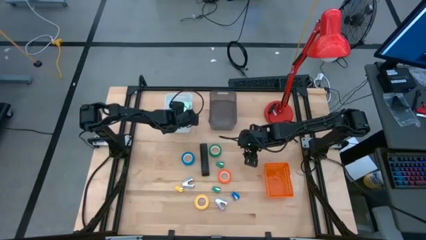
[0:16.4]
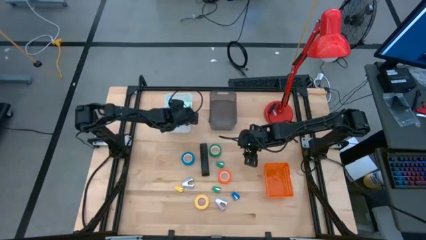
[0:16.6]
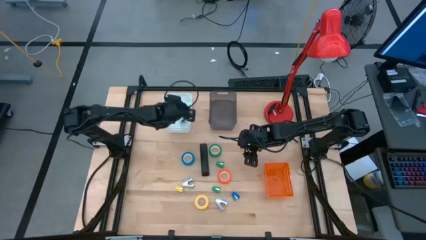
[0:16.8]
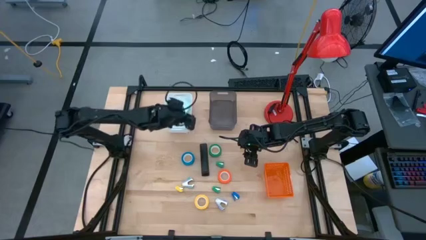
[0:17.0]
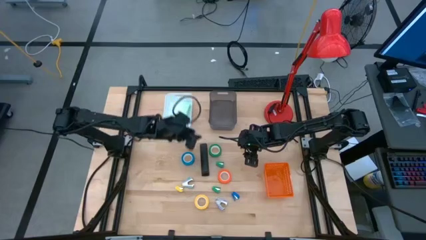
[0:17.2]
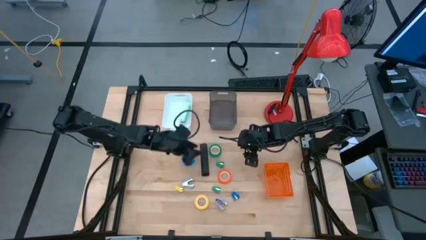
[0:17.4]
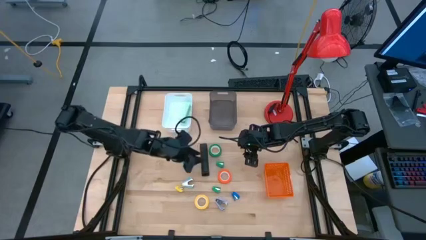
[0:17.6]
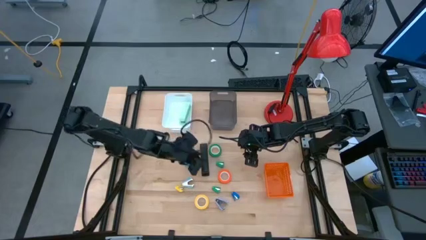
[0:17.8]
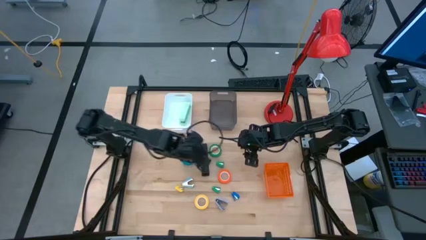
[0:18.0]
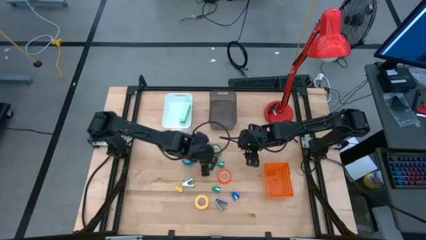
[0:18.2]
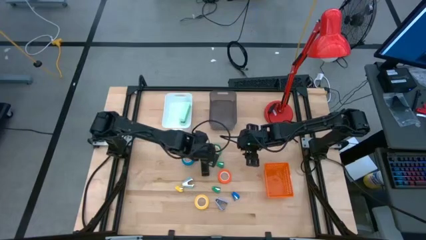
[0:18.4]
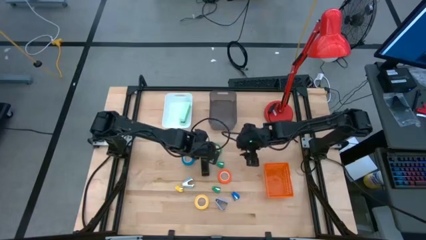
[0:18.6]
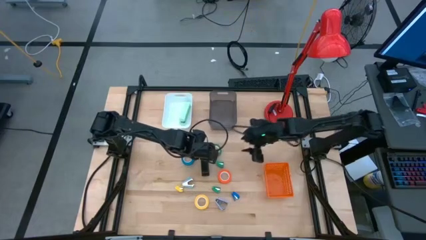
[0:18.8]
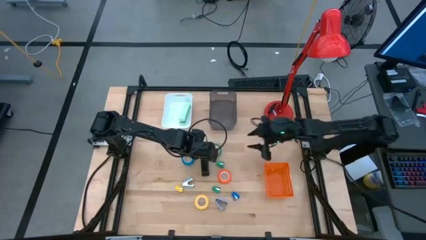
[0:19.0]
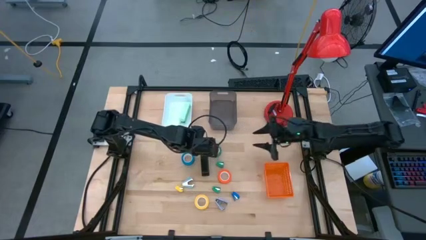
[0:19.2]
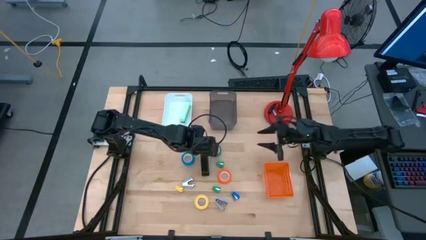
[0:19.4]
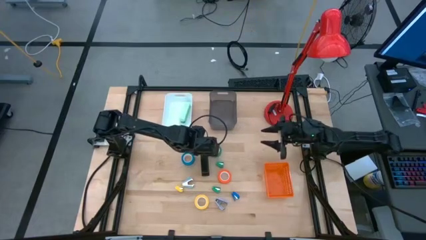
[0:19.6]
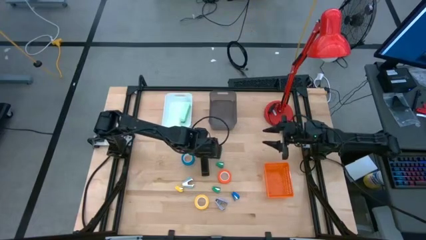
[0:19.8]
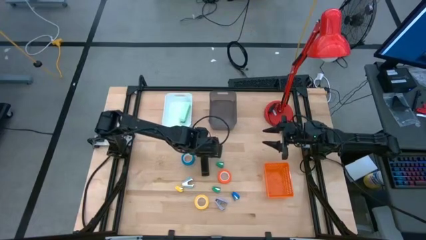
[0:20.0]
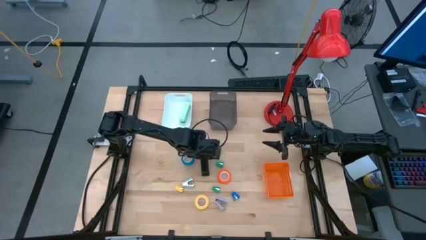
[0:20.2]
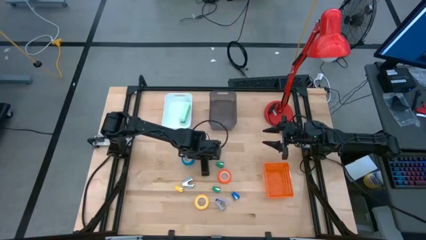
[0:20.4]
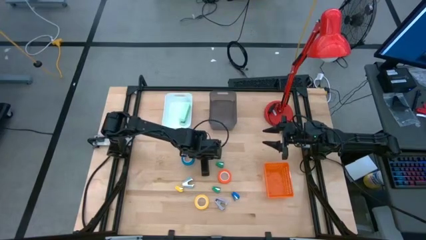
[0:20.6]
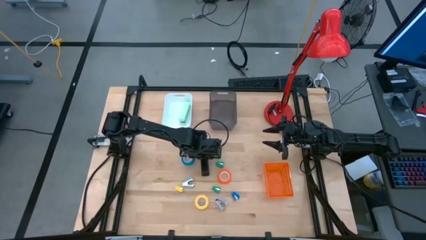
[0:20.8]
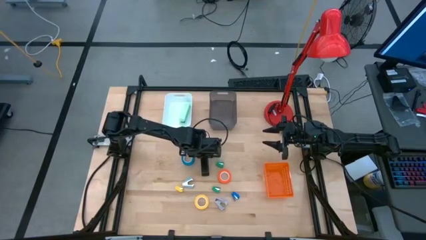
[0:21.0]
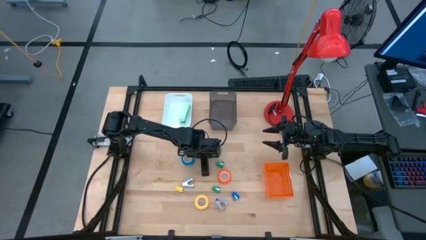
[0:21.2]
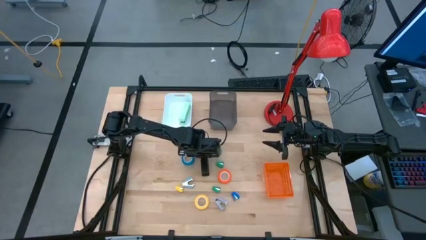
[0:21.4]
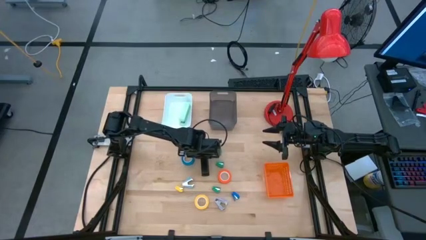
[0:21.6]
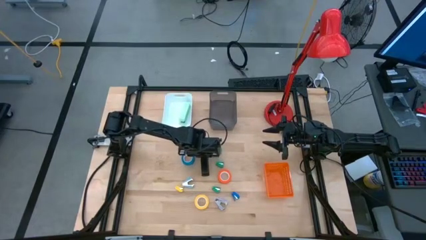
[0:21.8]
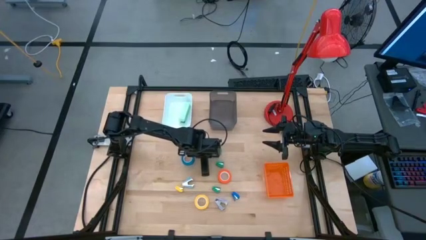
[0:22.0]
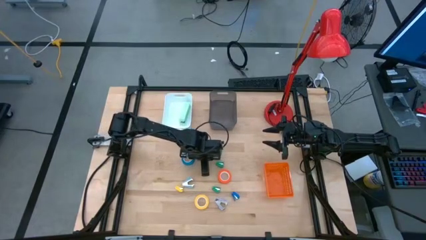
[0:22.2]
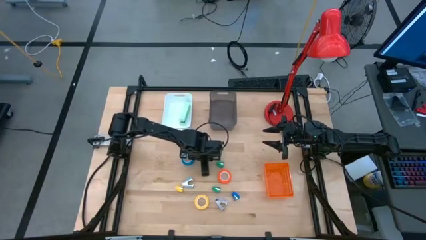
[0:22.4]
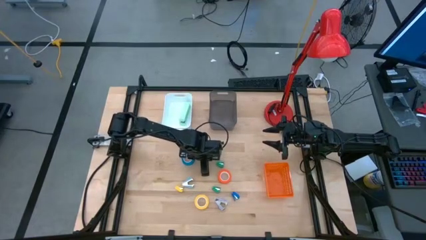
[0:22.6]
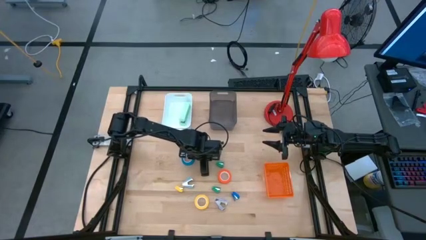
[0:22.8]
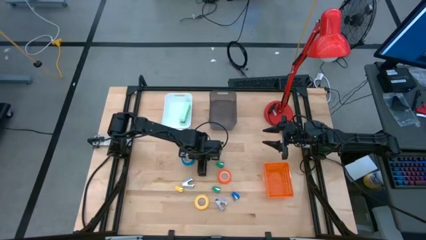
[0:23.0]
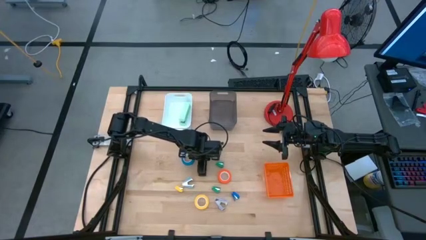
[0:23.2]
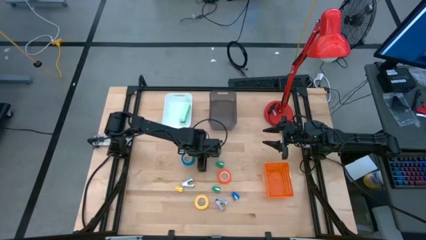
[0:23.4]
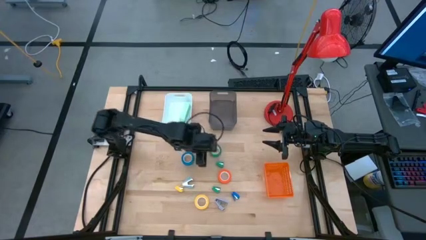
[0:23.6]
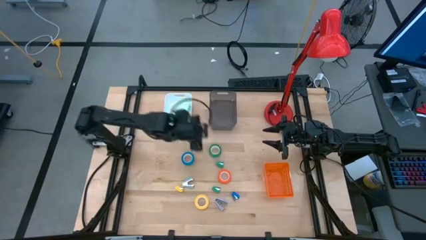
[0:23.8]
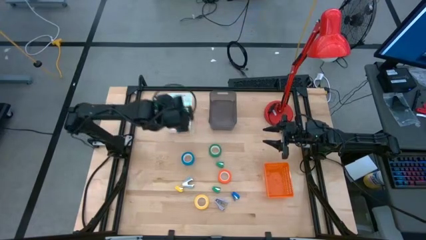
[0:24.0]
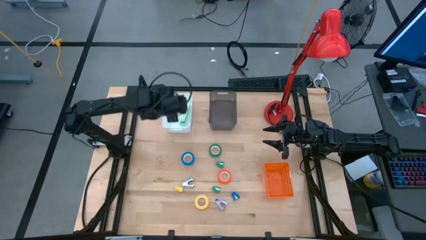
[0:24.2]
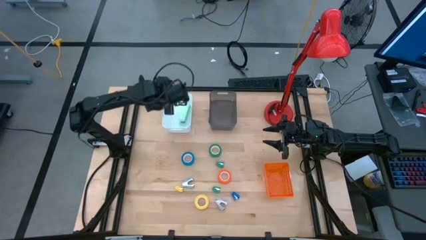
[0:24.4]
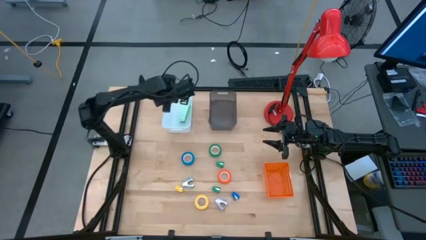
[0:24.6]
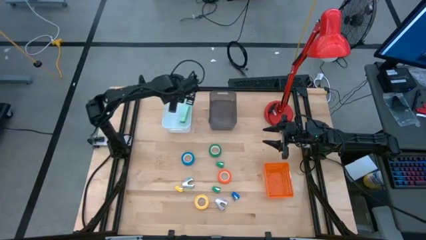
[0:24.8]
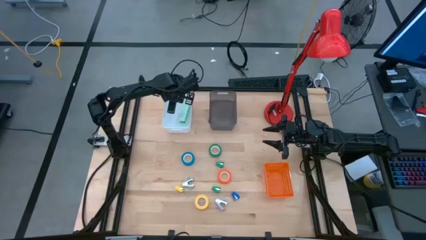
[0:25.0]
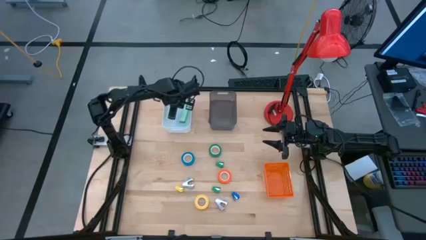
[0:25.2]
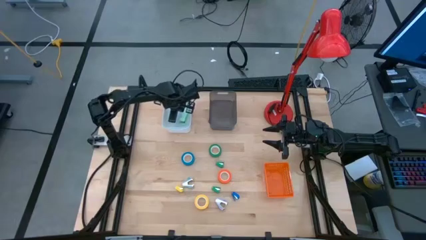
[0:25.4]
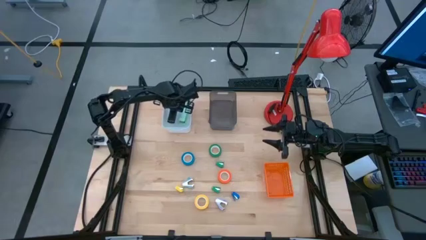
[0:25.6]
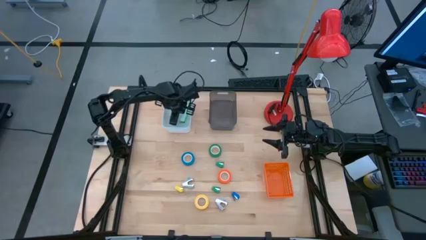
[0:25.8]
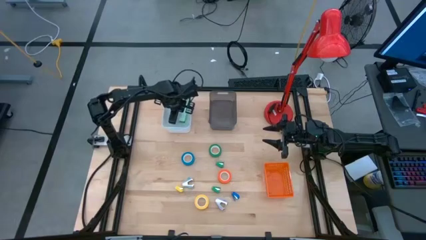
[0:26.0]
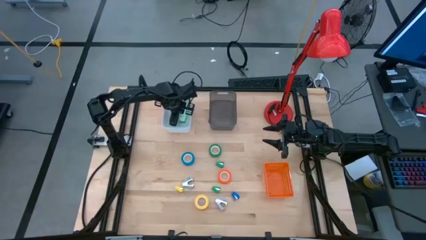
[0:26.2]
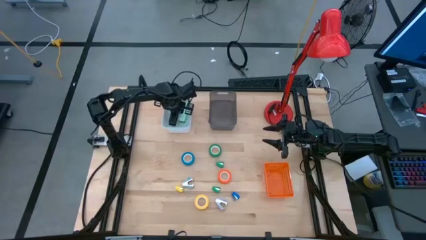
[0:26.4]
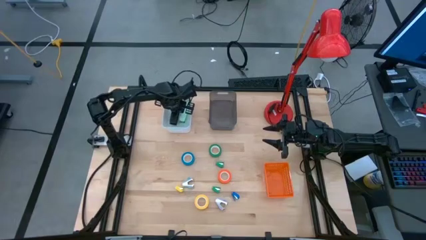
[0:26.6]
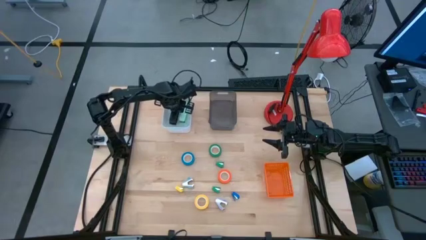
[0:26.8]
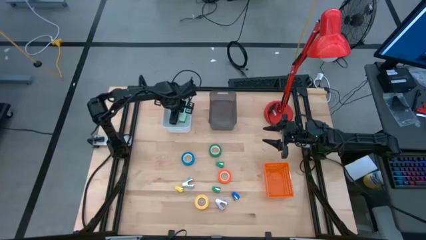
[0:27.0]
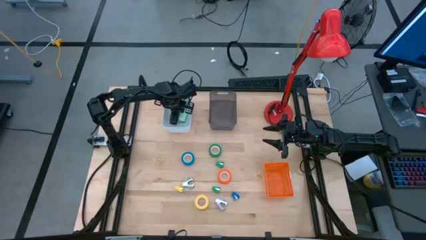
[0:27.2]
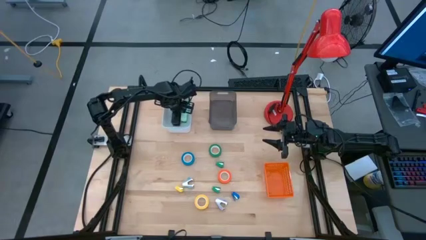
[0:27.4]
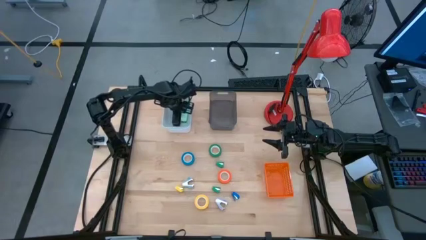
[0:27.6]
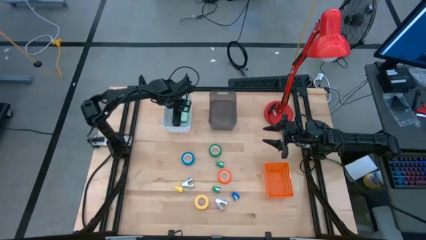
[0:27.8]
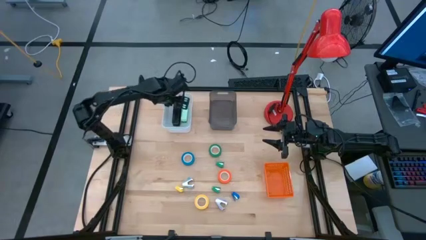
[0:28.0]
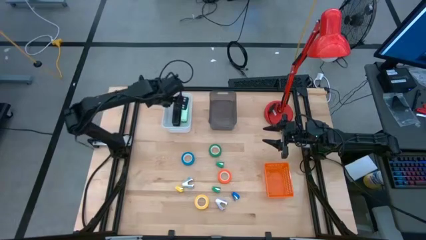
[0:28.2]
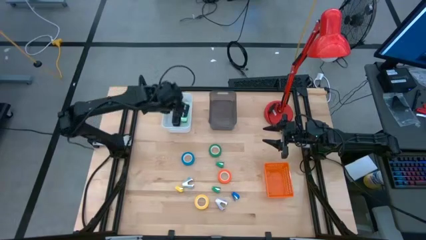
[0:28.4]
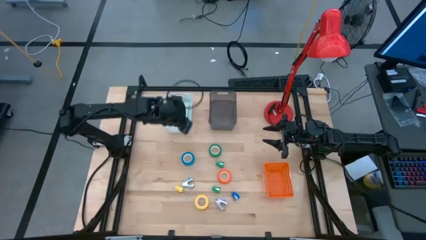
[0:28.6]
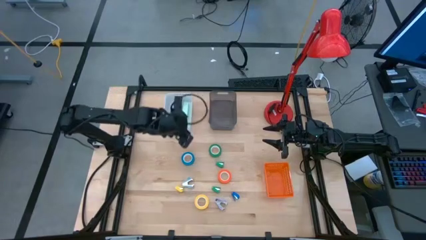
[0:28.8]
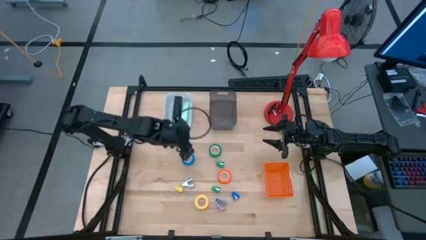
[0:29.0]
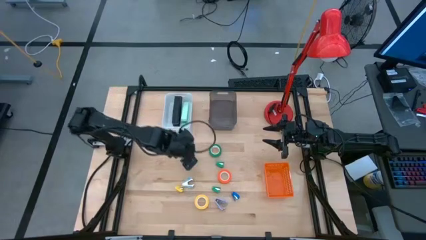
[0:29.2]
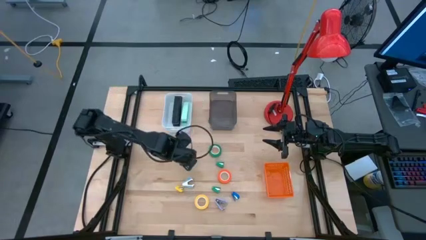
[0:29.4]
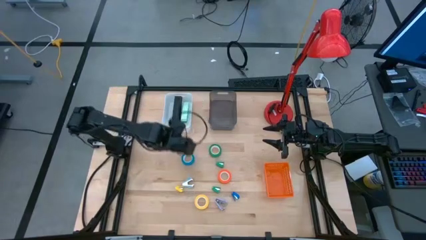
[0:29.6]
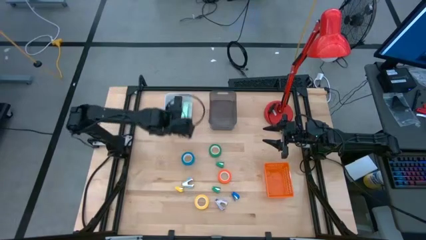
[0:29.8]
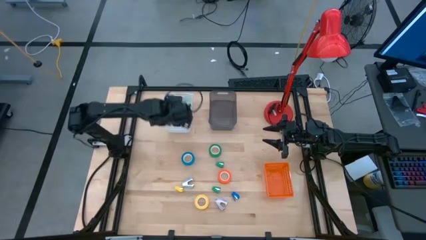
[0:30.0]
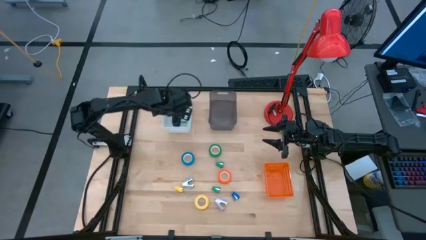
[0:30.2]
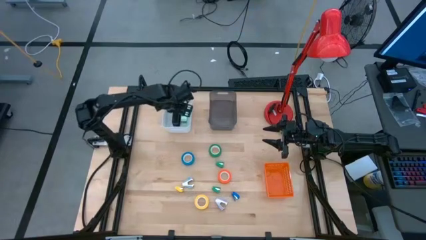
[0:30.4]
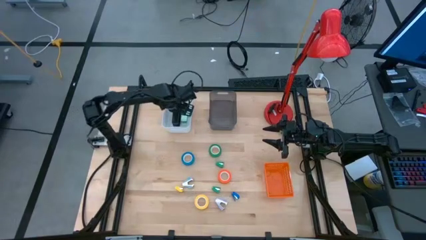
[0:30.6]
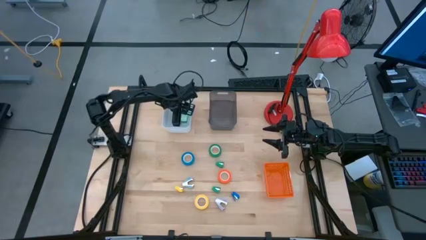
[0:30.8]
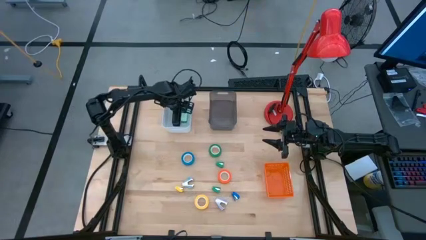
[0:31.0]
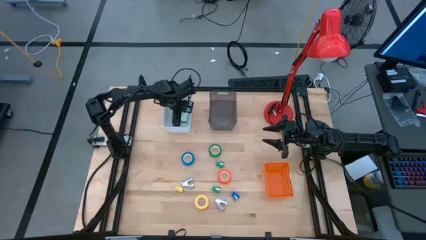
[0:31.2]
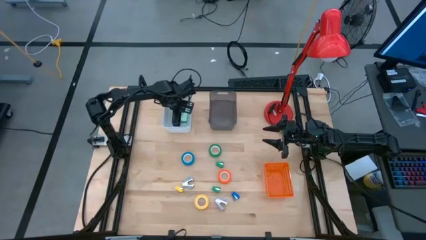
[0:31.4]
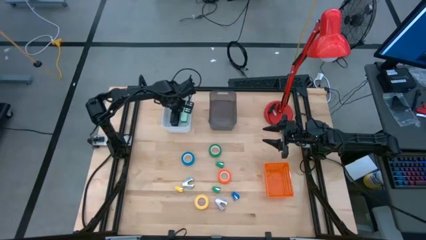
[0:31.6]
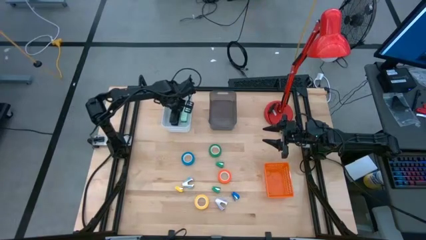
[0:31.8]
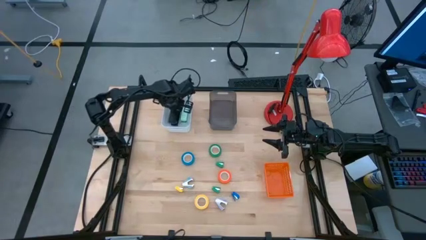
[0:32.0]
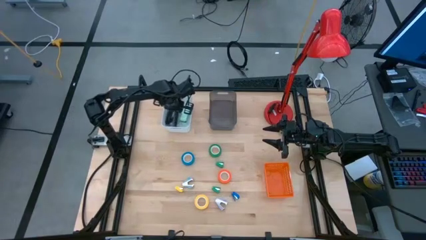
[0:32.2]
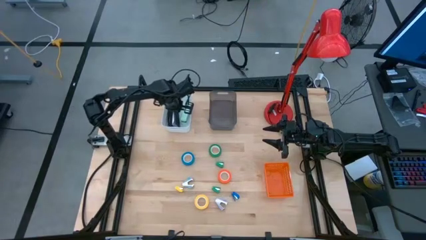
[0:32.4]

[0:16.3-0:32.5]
Task: Pick and place Stapler, Stapler remover, tape
Put the black stapler into the white bin
